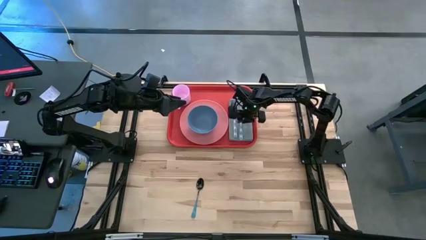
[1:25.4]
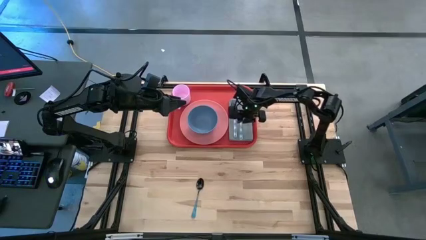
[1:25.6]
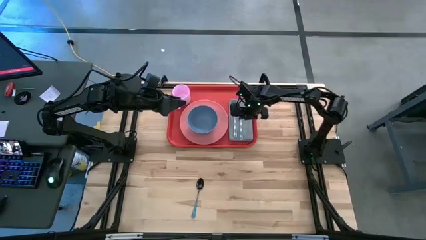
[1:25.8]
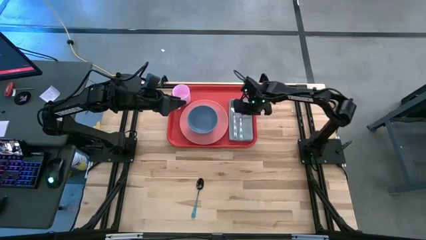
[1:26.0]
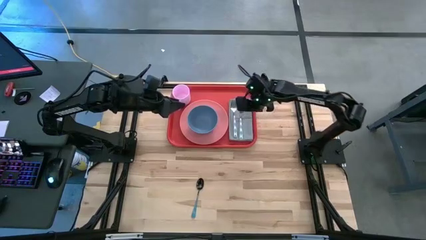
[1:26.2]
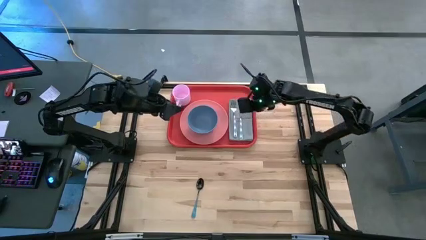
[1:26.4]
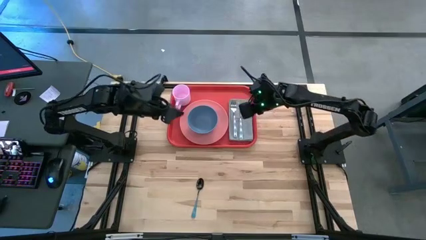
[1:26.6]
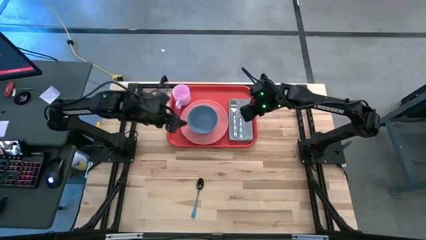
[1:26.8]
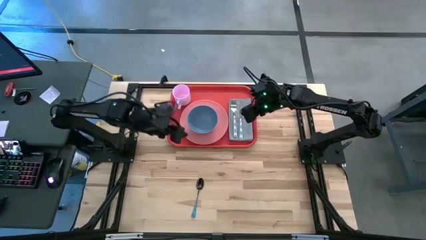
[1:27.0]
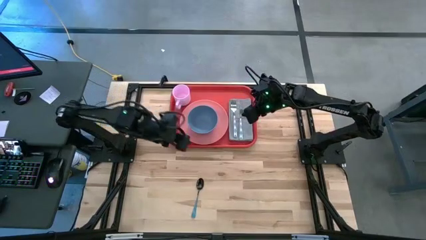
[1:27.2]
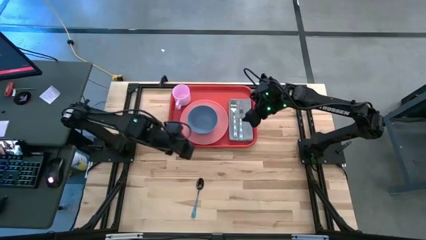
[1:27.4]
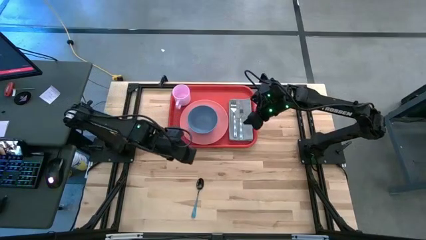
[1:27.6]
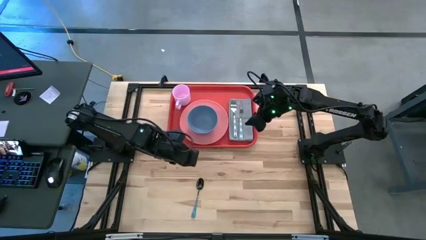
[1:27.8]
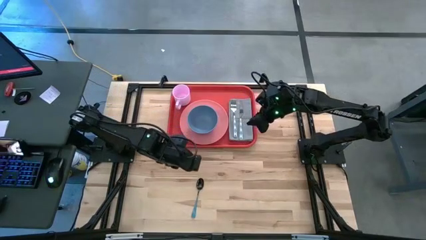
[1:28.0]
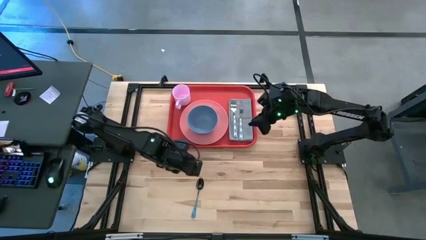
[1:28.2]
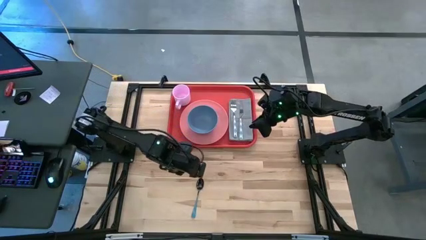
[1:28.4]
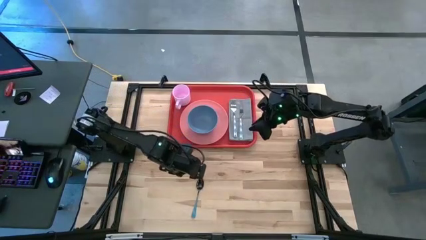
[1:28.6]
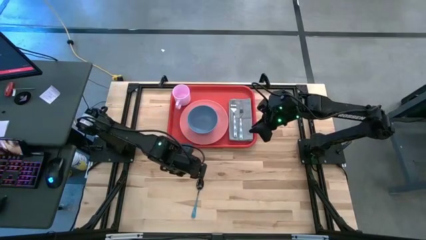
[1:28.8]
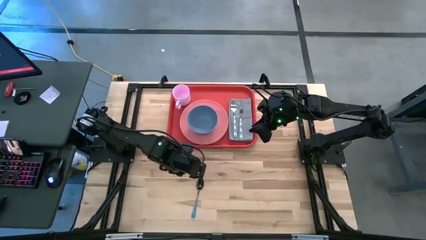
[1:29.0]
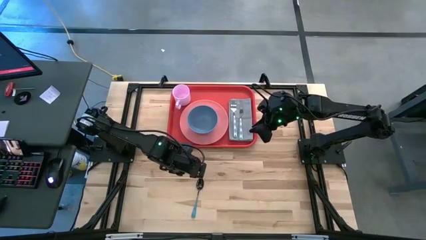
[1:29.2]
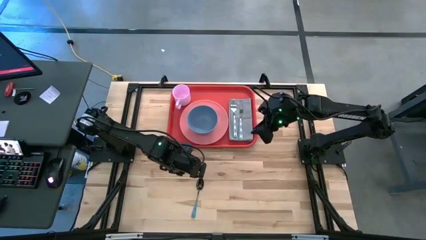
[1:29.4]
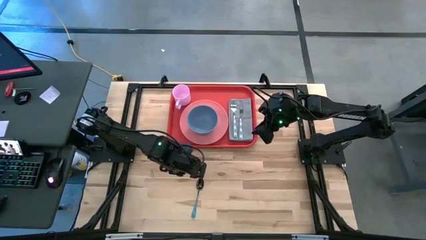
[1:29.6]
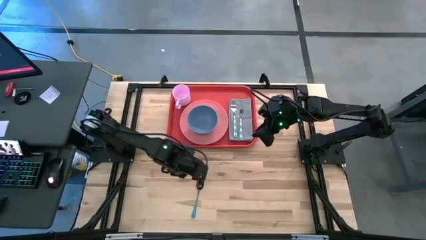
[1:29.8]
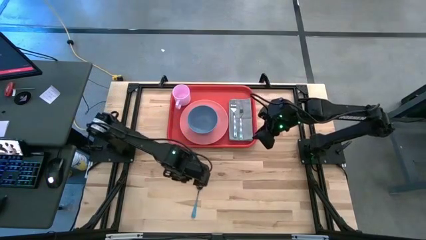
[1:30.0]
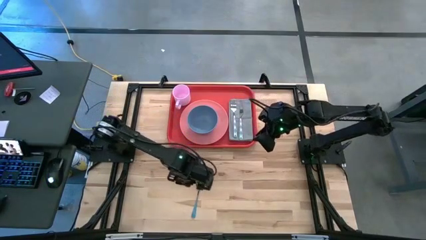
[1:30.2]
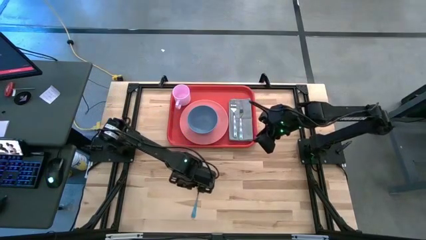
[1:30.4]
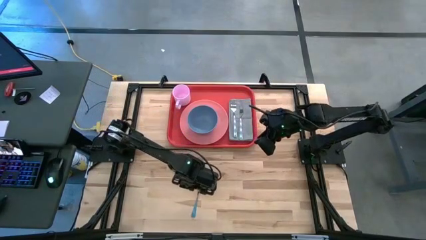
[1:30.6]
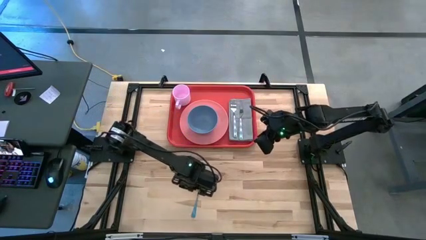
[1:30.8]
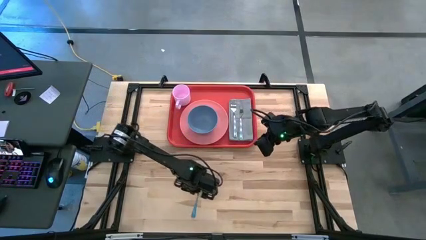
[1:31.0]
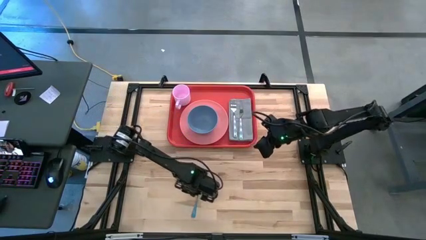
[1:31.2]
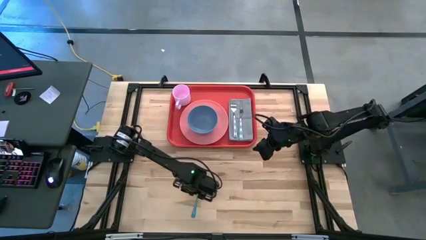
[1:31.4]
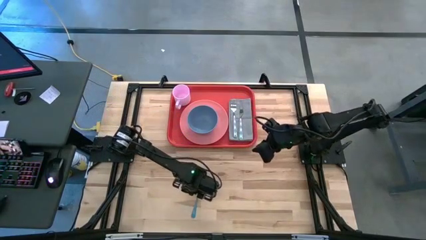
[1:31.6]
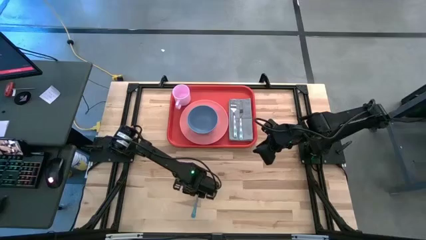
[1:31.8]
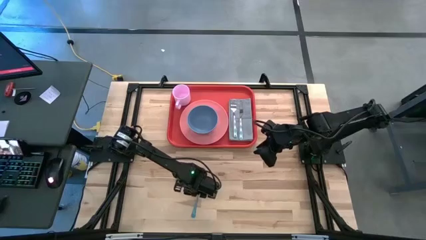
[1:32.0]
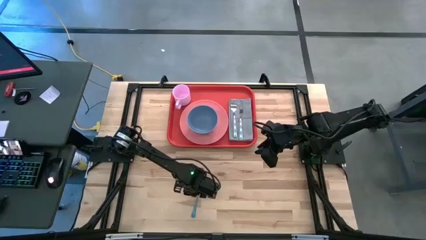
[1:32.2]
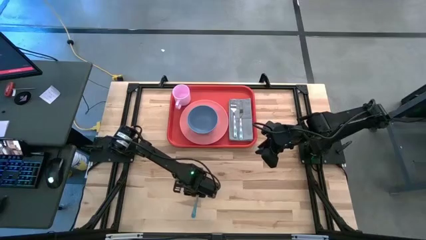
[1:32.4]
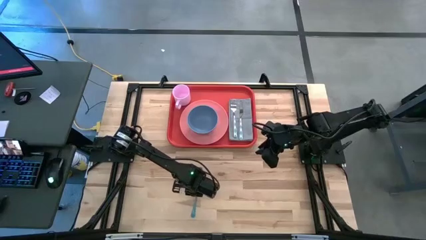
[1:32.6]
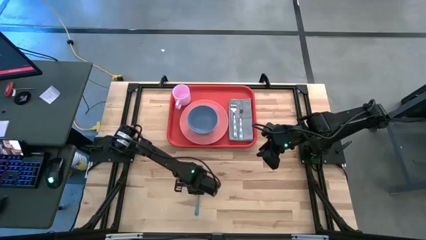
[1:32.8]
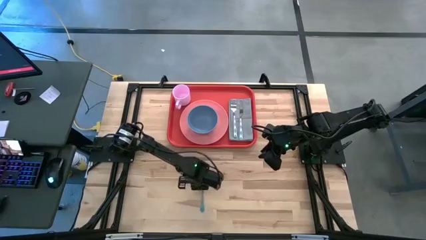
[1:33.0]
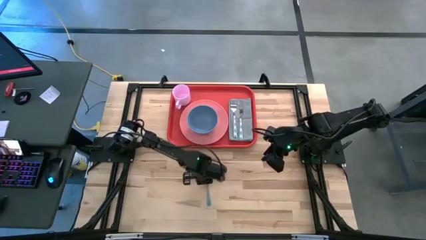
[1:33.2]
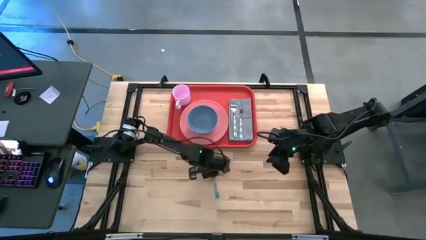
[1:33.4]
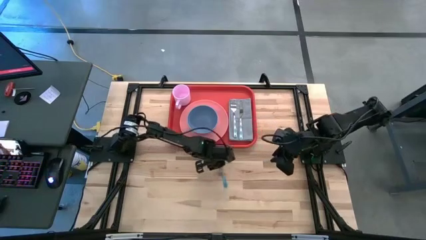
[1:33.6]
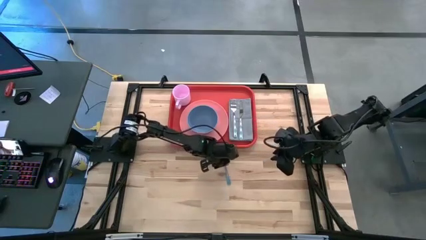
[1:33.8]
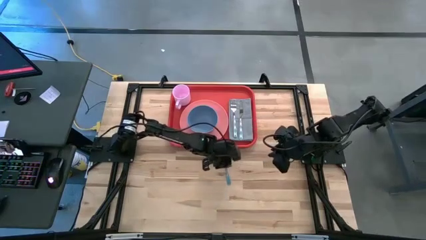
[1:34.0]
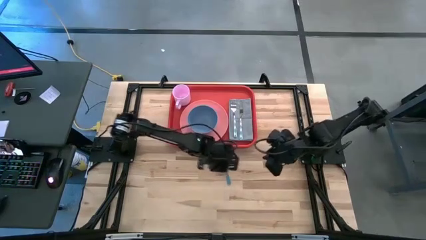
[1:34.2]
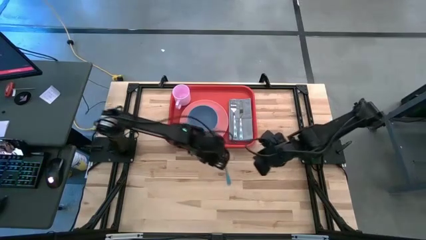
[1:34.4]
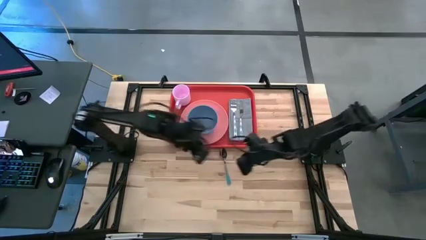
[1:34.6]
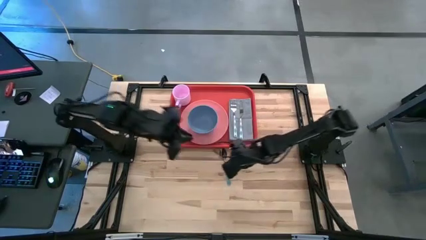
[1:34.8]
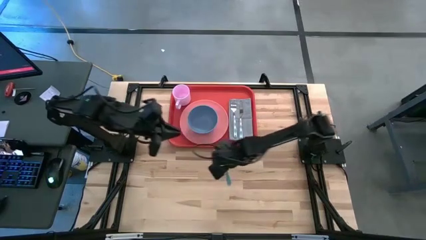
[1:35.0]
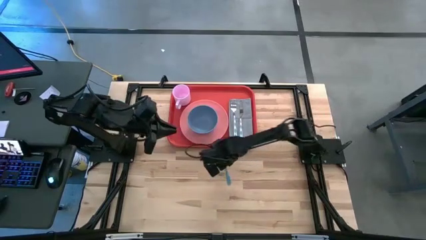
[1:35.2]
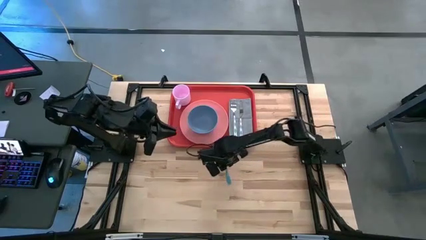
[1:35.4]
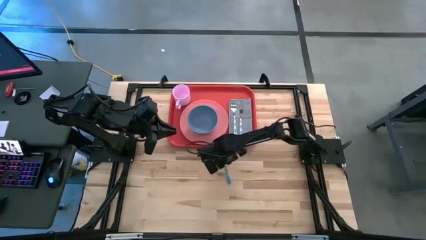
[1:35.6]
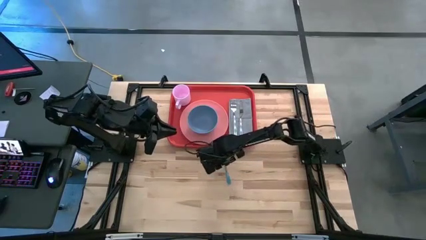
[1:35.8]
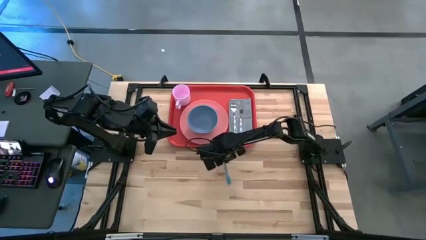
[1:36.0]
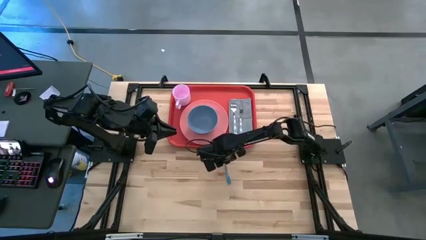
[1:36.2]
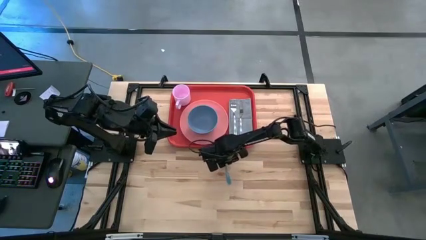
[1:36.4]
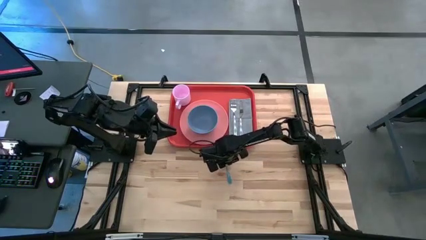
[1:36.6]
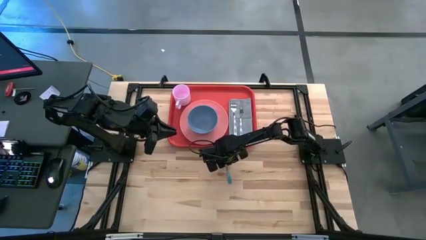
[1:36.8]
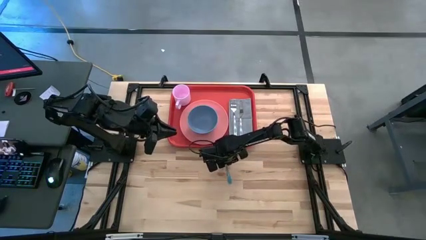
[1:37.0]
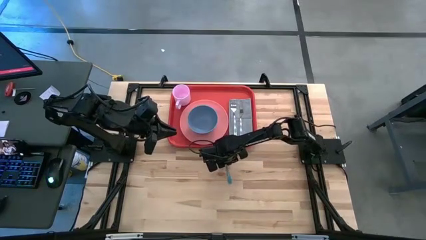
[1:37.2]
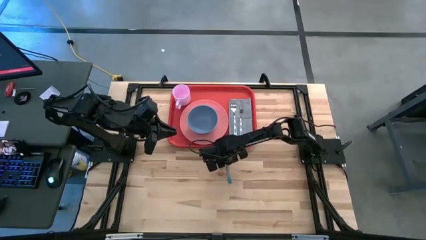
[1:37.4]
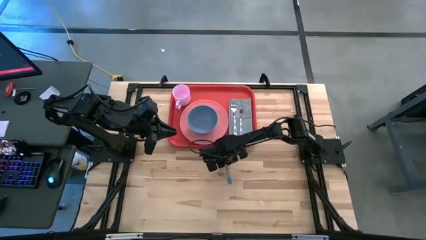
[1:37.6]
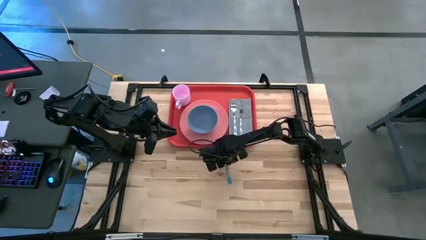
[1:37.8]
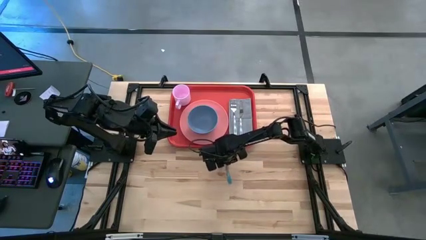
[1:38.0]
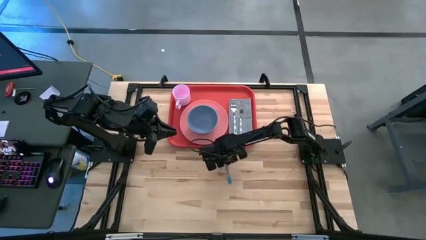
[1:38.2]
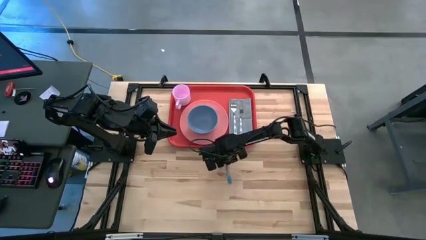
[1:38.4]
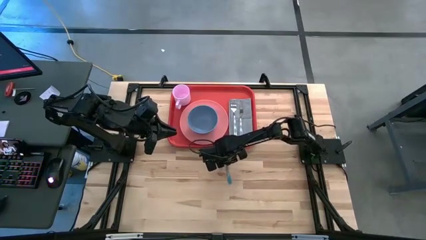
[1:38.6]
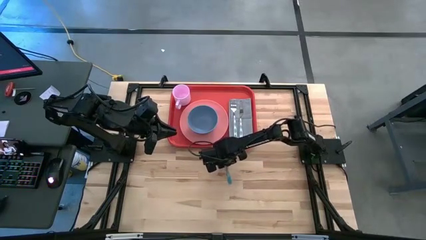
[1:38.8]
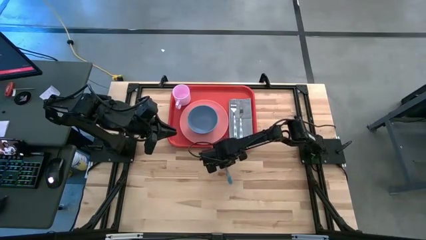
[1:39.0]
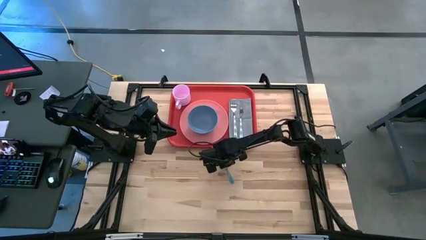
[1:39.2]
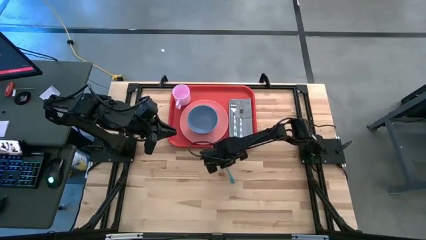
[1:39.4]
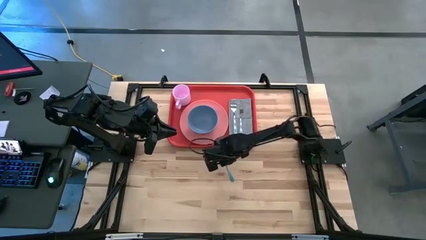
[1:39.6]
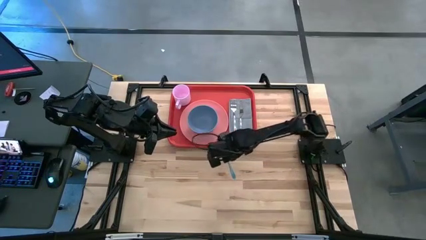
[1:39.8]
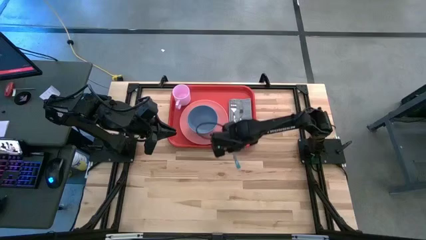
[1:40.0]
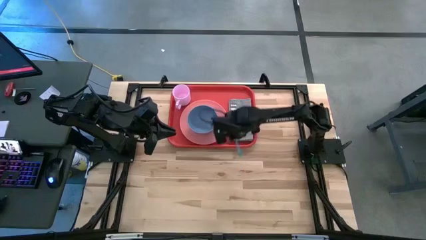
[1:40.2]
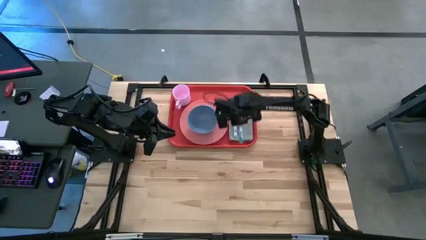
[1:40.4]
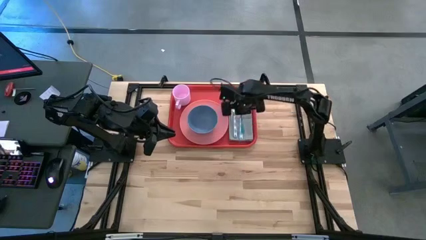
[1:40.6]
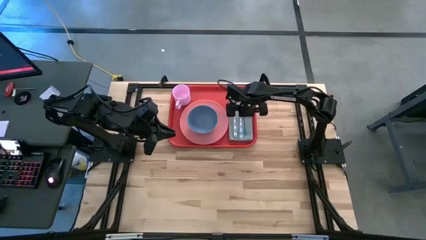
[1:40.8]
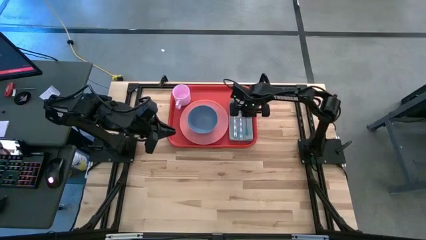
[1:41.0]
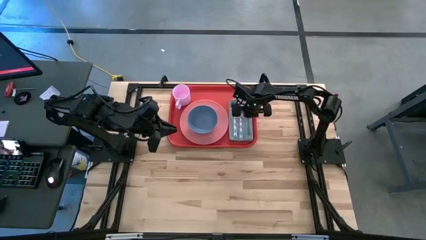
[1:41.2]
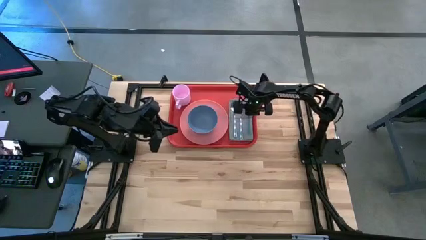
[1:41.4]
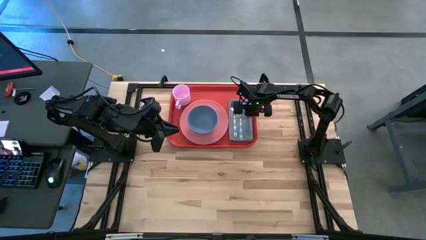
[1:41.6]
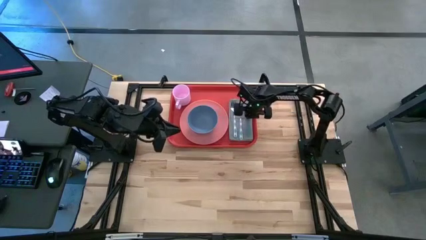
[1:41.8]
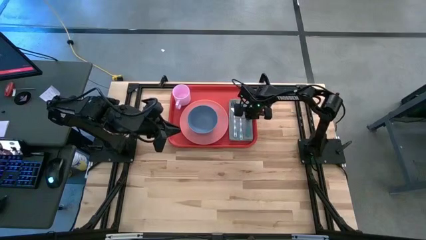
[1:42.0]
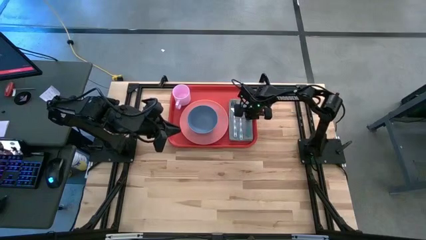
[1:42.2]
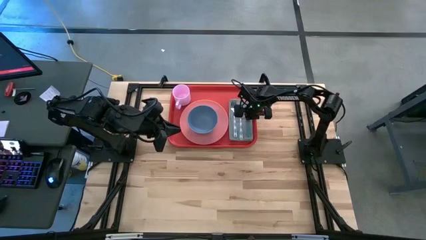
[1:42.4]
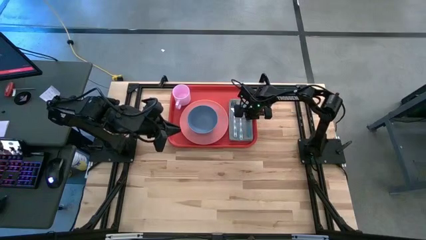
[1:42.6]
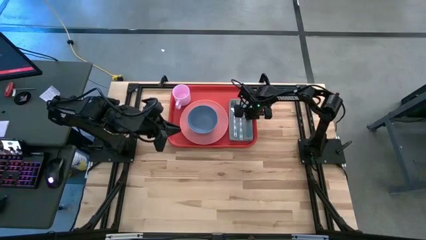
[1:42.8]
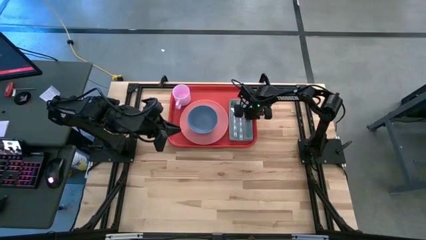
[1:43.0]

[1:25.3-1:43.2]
Task: Set up tray
Put the blue spoon on the gray napkin to the right of the blue knife
